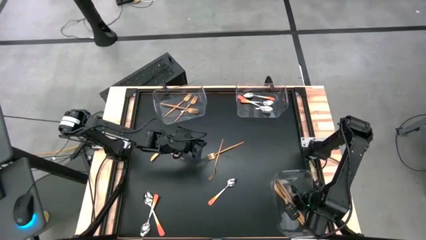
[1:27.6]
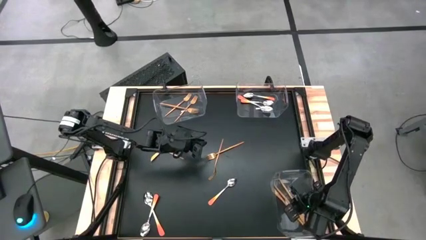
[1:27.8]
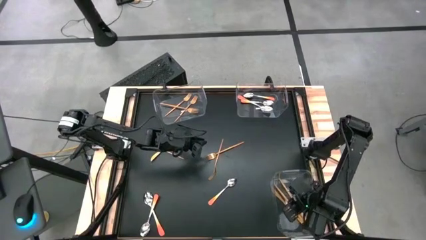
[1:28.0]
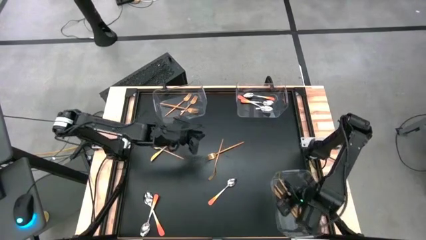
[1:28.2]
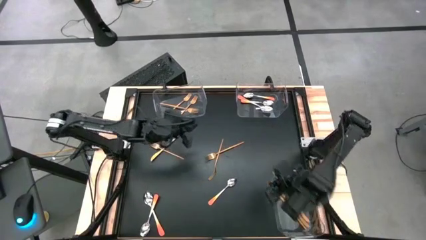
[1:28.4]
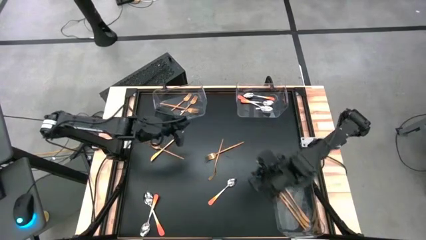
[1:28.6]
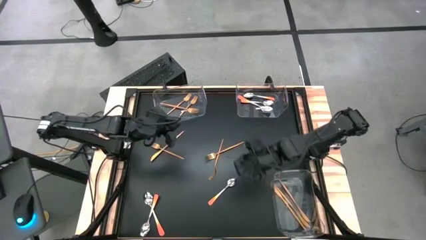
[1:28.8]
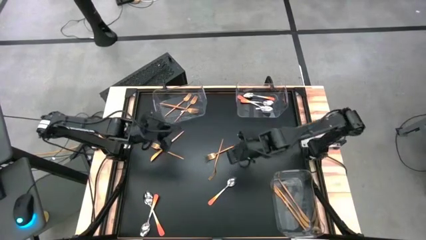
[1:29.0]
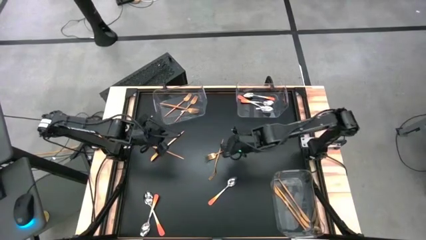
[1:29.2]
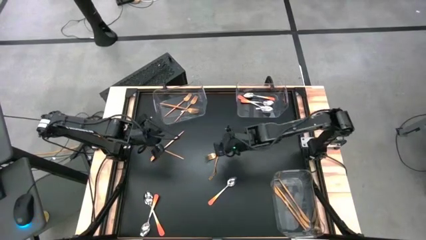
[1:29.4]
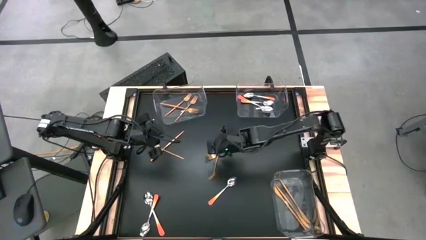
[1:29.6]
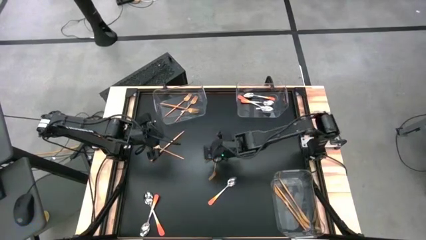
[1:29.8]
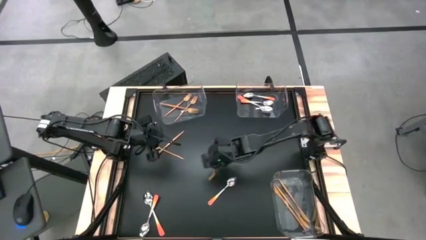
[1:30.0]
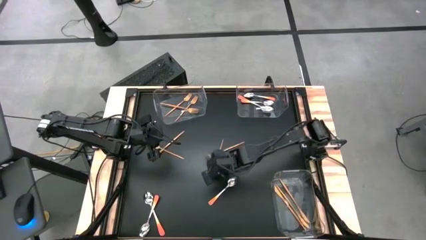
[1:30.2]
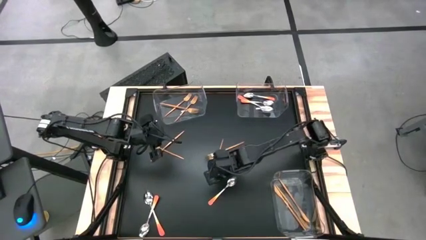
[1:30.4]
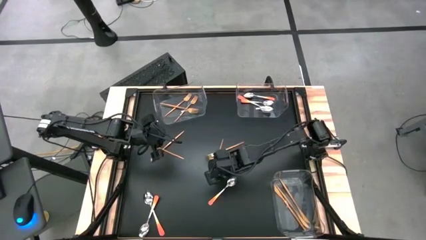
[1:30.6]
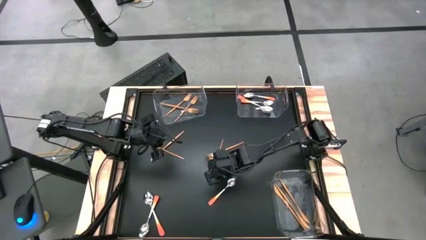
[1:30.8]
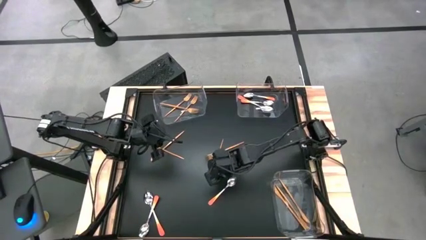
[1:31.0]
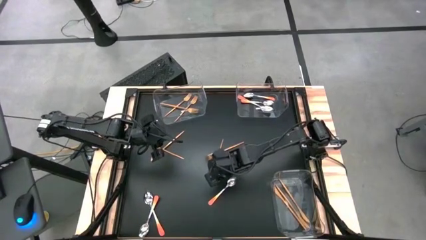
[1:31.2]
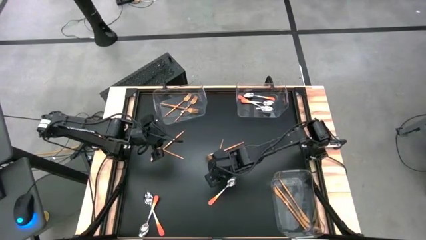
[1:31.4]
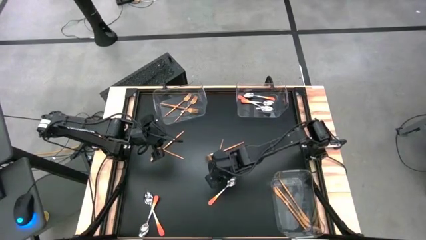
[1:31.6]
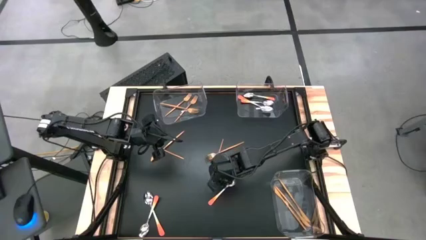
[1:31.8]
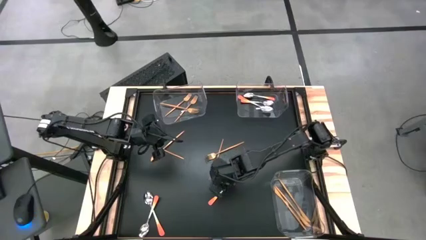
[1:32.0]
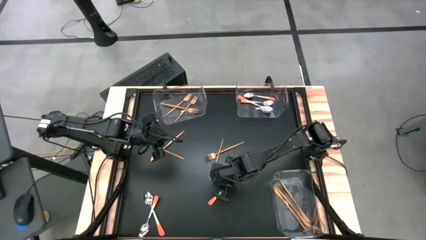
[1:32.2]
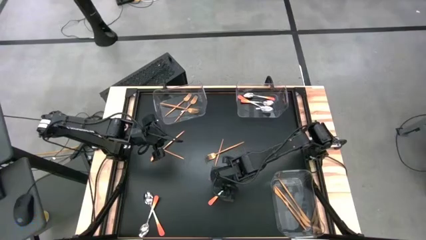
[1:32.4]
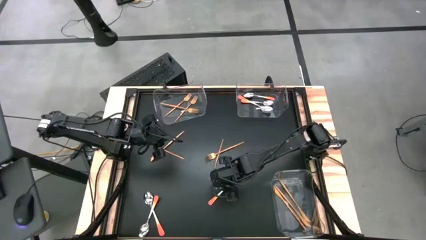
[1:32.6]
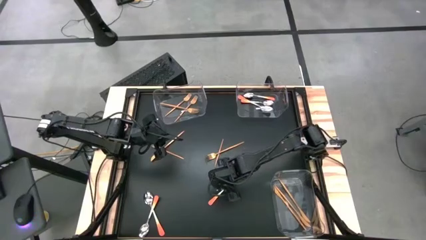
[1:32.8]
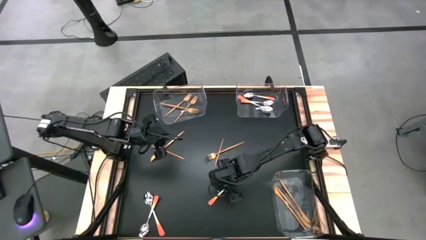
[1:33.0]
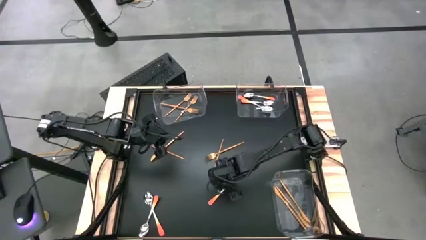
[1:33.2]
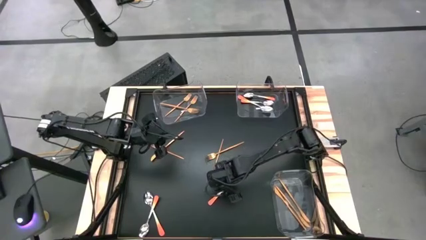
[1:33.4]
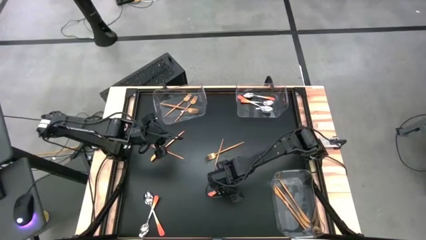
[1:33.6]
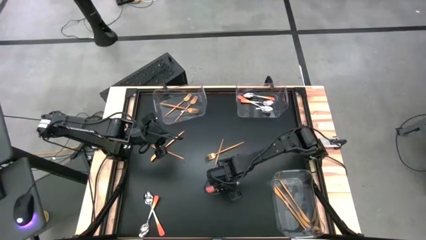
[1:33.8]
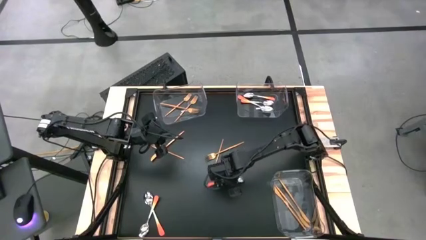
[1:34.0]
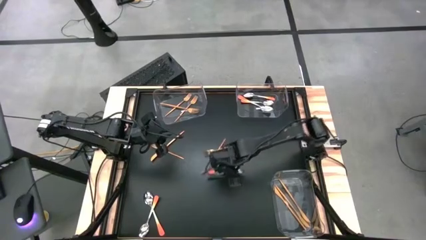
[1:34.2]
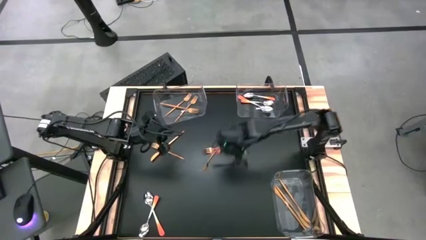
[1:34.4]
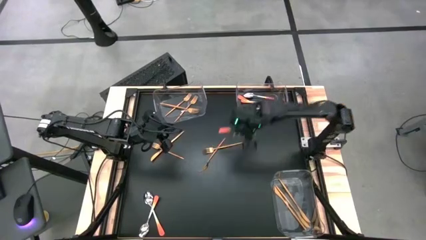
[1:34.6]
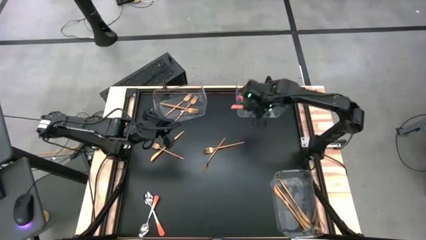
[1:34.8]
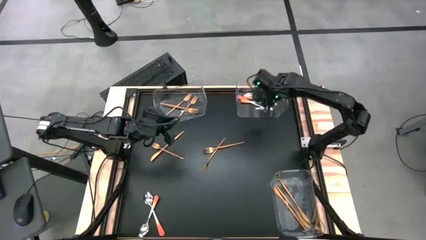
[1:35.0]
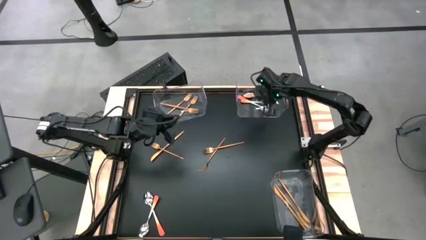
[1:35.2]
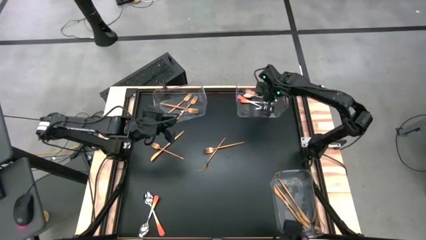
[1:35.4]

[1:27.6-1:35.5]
Task: Sort silverware by color (type)
Put the orange spoon into the top right transparent bin

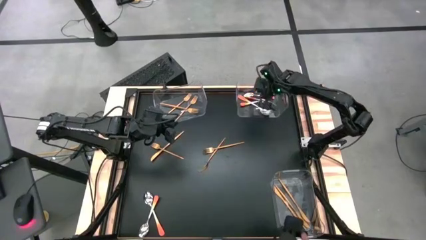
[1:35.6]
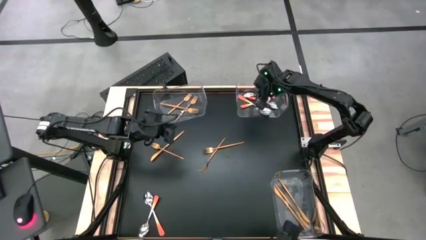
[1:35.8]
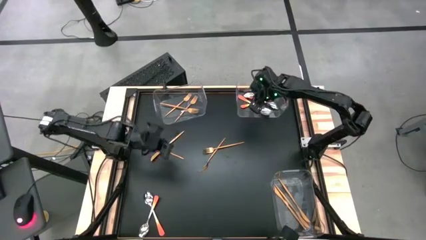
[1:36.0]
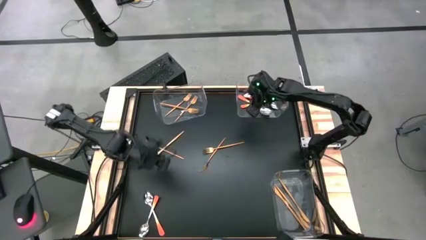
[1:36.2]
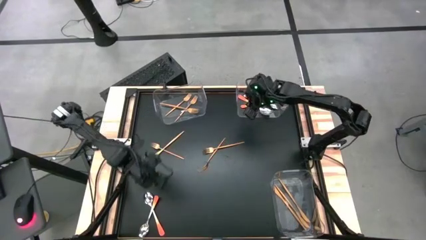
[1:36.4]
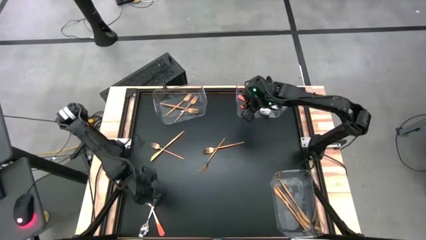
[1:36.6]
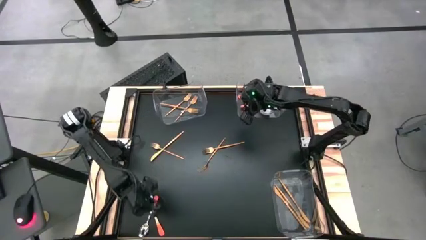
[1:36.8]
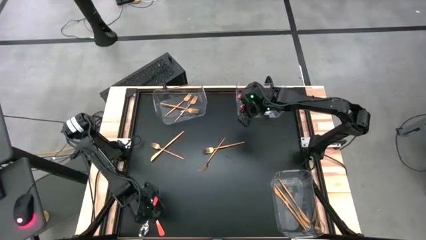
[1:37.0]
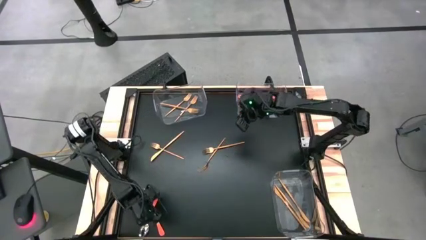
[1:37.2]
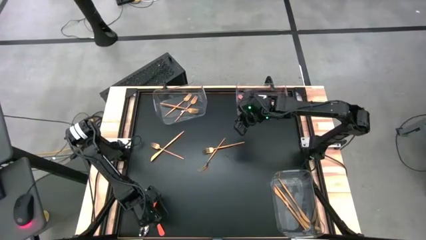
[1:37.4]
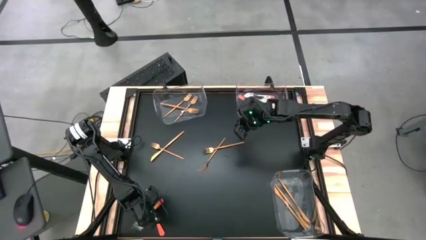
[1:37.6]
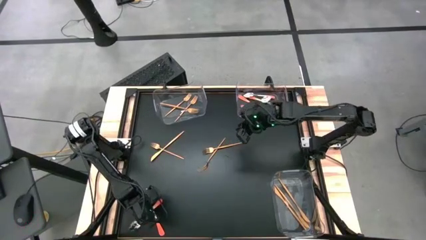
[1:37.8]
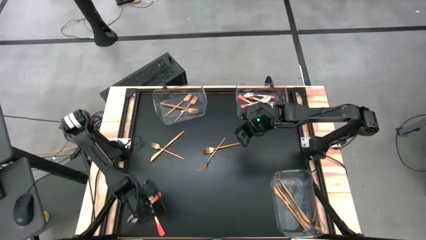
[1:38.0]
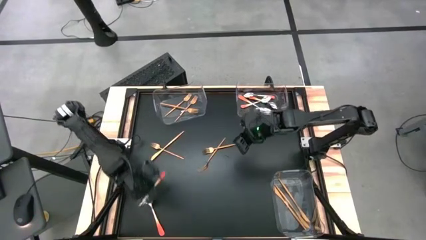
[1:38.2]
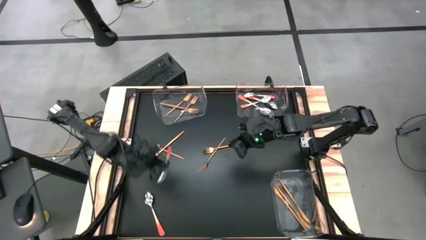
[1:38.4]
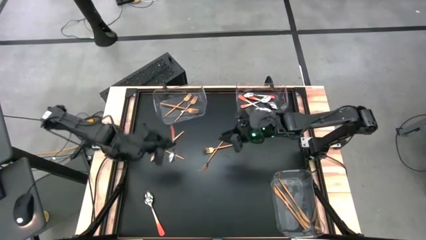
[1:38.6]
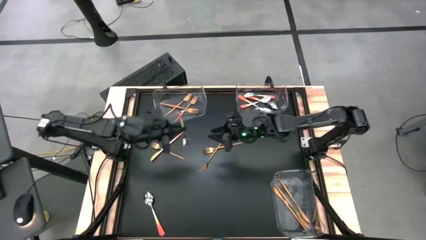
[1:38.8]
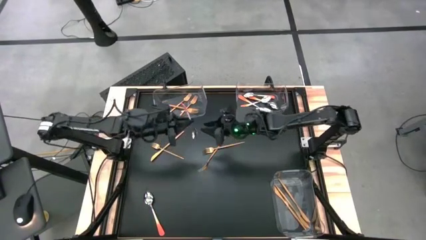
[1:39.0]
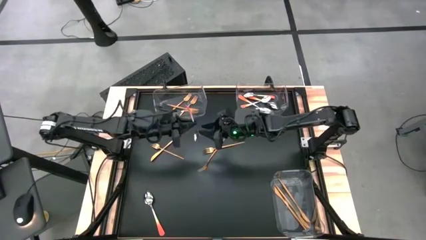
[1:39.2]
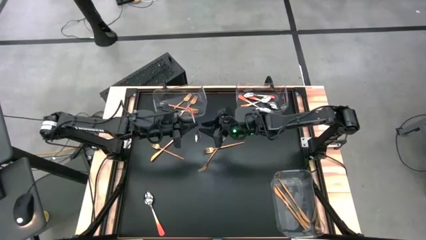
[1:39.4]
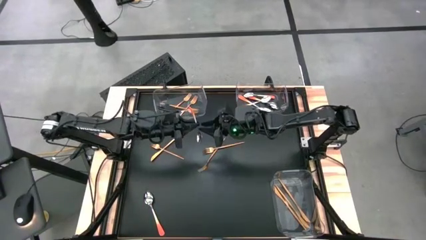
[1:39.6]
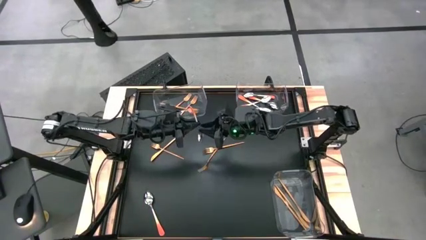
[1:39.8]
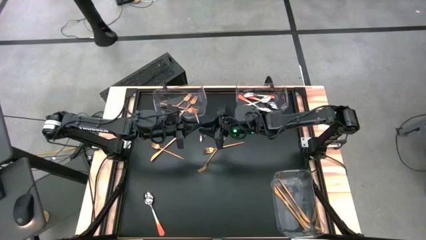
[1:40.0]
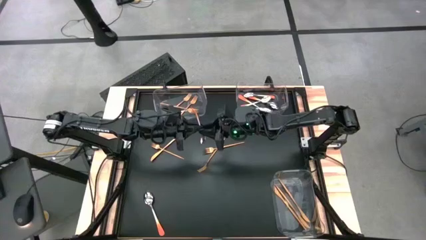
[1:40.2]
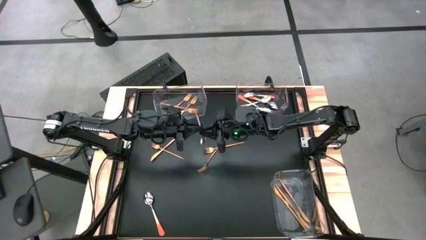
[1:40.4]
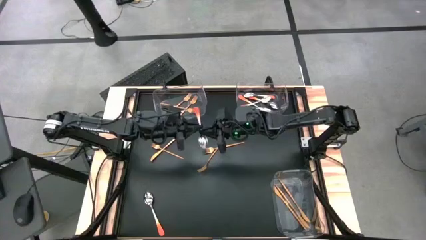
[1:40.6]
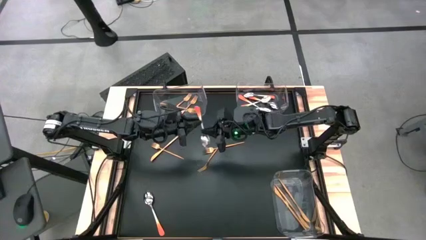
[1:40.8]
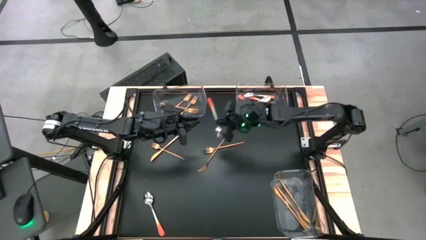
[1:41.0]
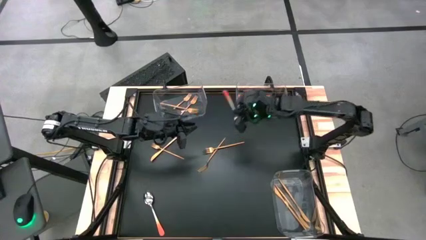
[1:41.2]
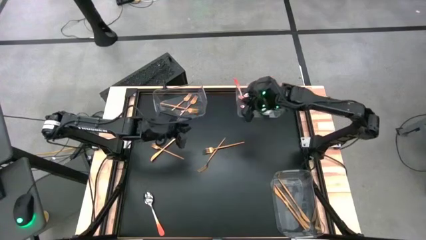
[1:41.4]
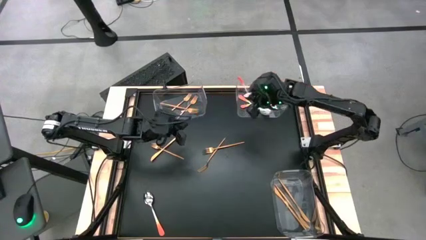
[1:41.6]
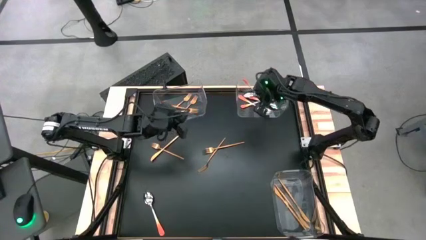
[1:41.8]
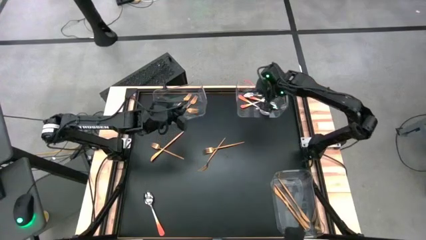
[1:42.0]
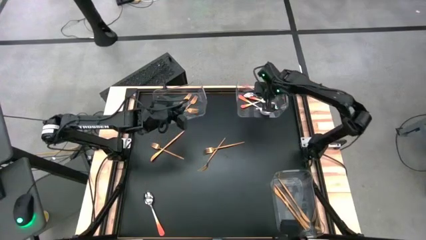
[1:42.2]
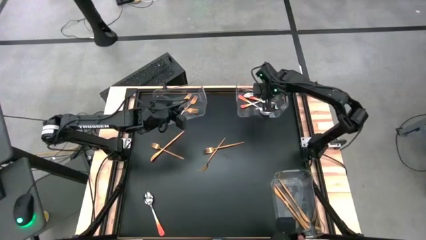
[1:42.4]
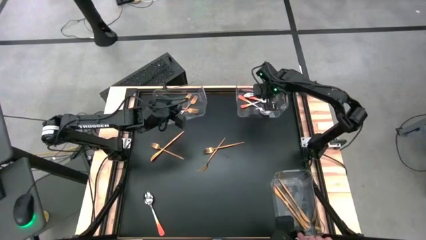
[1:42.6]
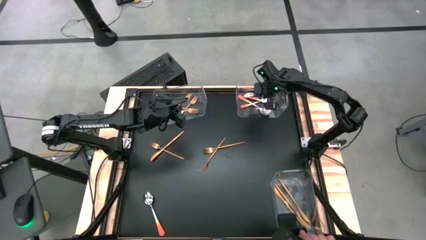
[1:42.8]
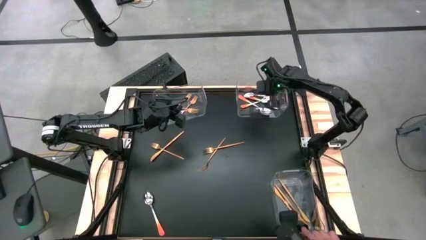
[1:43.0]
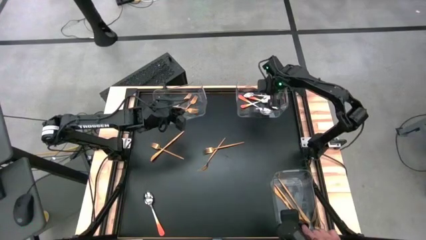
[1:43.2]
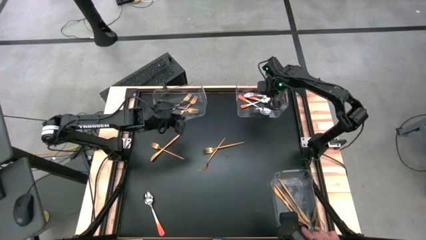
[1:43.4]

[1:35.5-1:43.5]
Put the orange spoon into the top right transparent bin

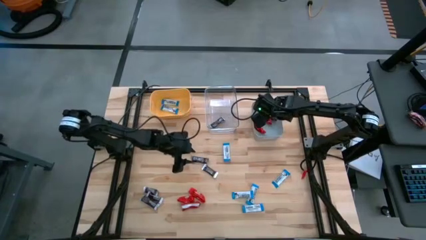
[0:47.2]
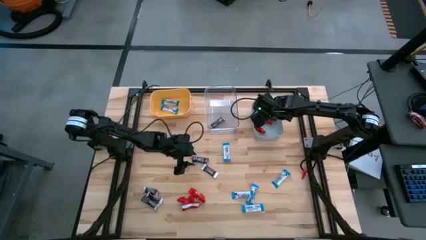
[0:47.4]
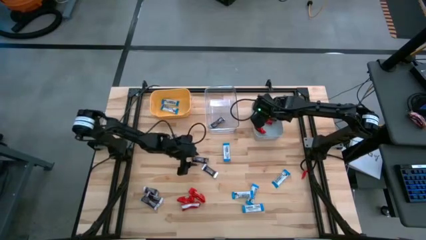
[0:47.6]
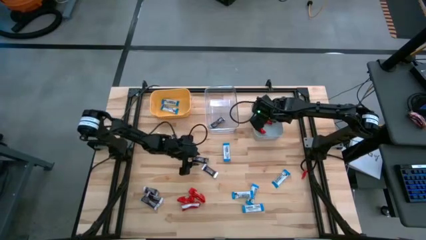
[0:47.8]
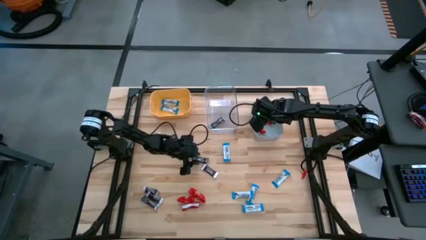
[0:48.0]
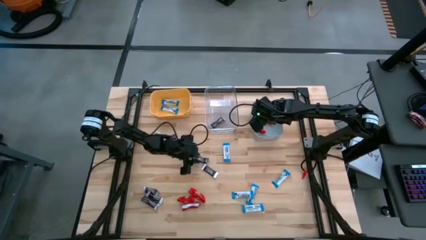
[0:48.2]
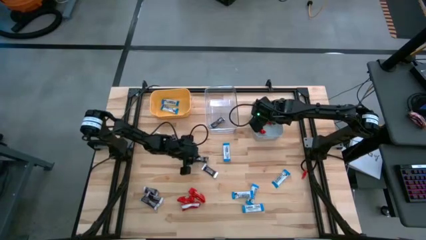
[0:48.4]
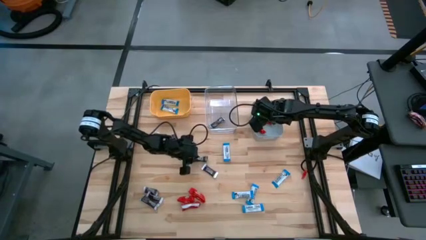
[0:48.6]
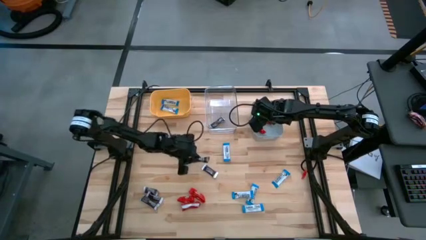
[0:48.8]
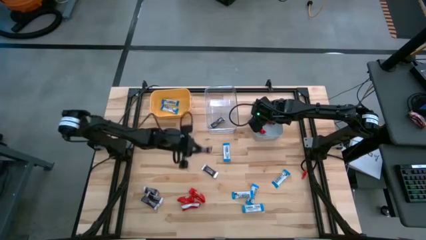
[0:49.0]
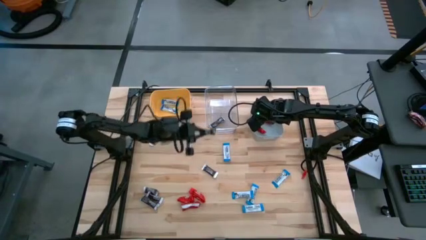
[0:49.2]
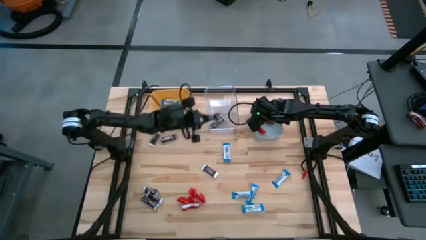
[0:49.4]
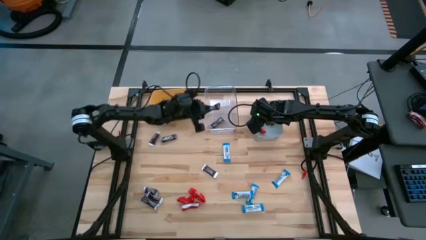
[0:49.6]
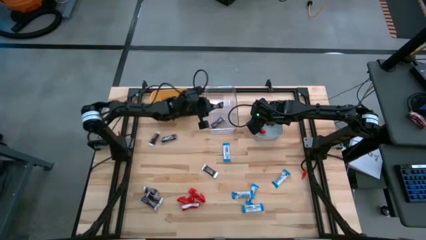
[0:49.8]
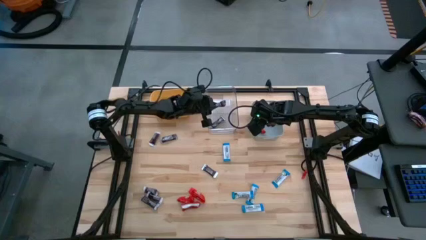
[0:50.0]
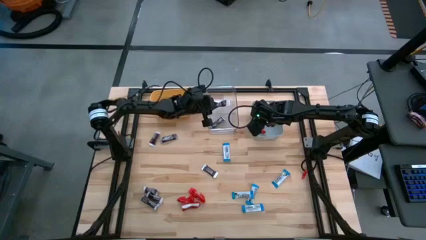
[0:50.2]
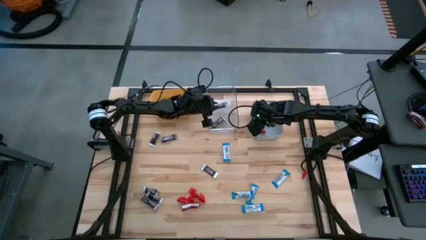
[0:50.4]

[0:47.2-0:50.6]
Task: Sort candy
Put the brown chocolate into the transparent bin
